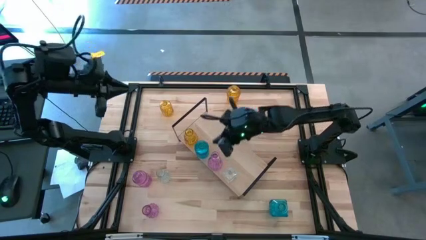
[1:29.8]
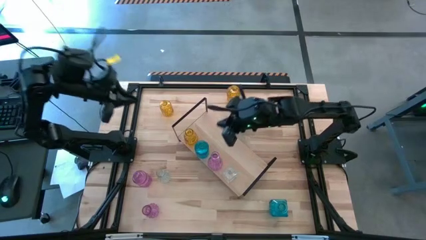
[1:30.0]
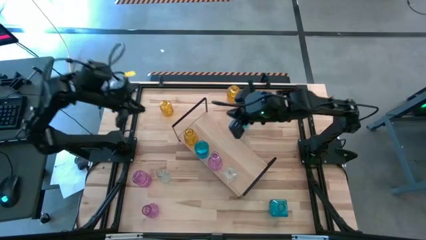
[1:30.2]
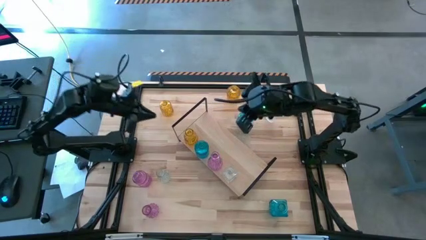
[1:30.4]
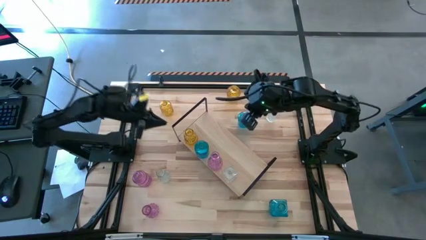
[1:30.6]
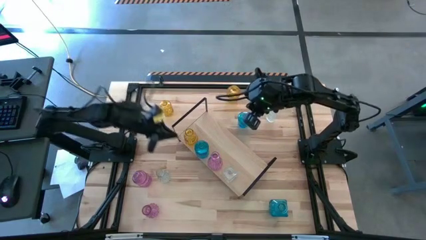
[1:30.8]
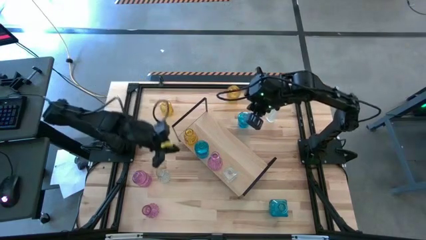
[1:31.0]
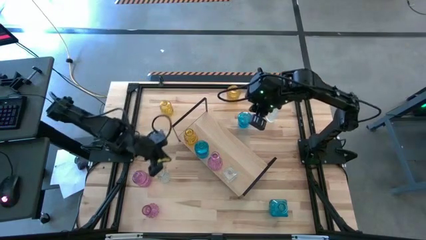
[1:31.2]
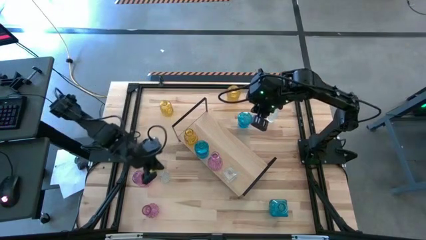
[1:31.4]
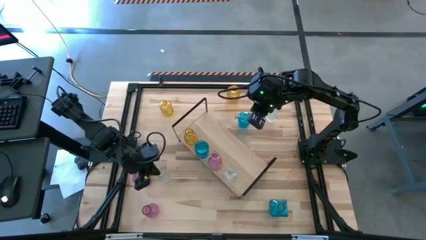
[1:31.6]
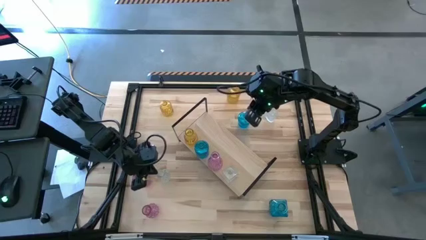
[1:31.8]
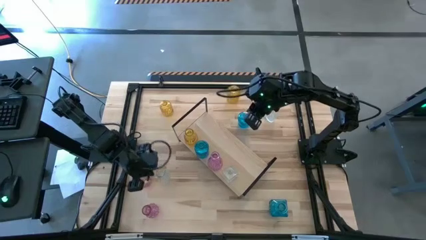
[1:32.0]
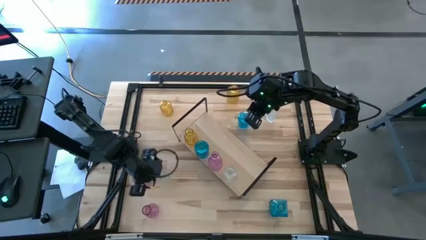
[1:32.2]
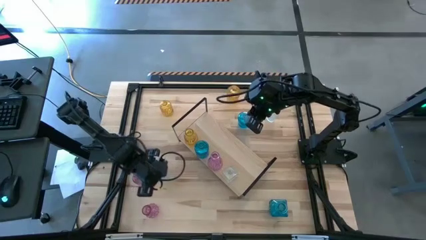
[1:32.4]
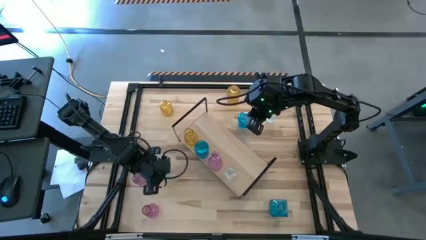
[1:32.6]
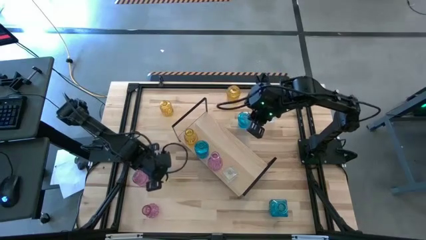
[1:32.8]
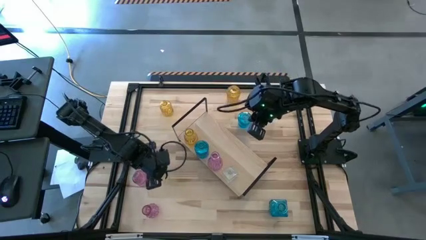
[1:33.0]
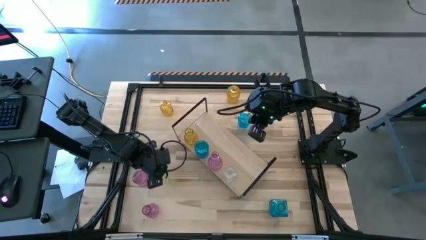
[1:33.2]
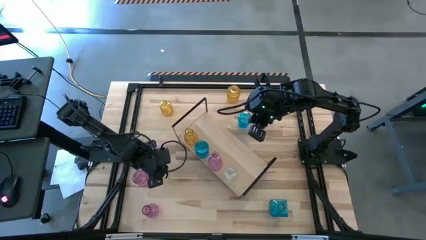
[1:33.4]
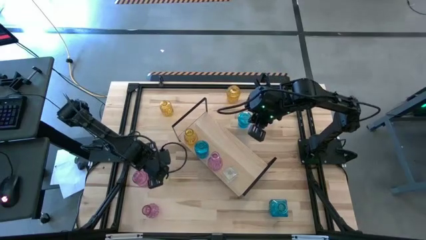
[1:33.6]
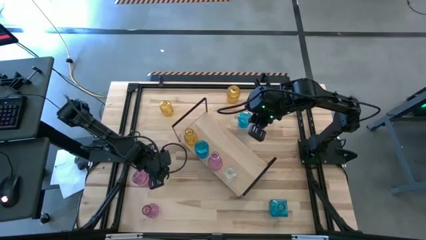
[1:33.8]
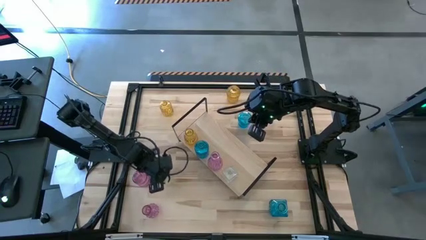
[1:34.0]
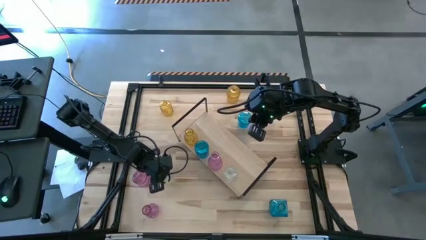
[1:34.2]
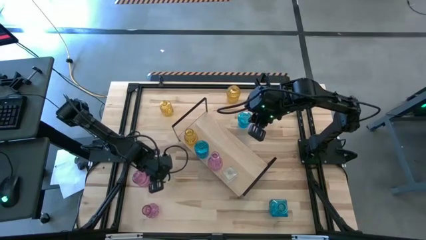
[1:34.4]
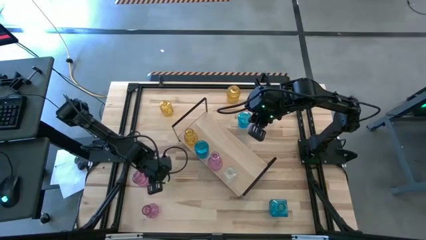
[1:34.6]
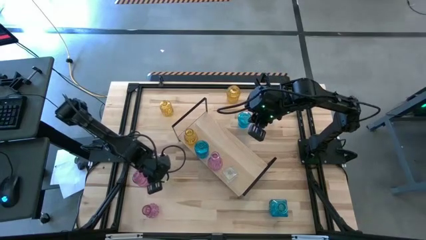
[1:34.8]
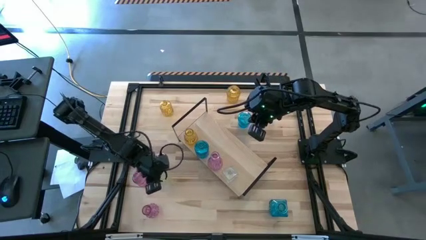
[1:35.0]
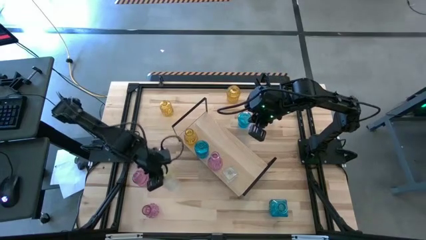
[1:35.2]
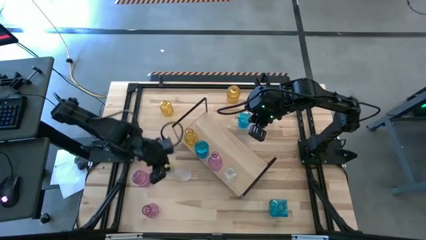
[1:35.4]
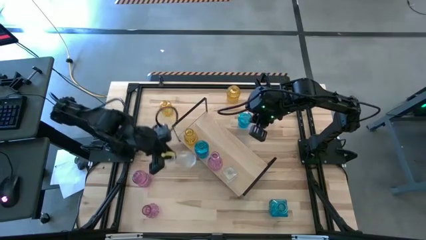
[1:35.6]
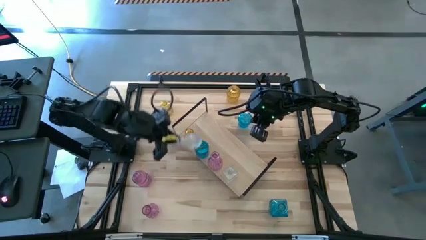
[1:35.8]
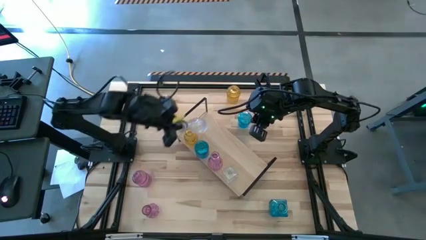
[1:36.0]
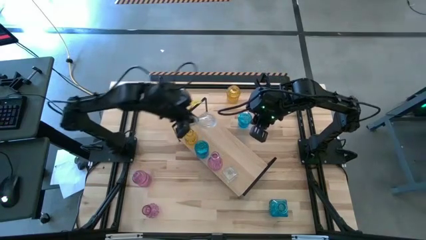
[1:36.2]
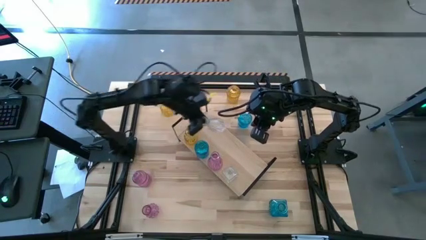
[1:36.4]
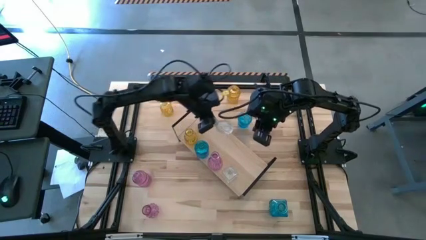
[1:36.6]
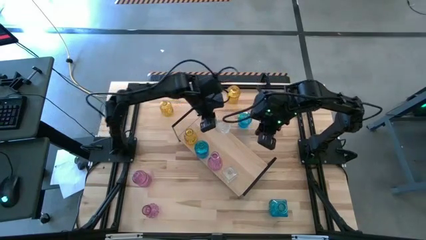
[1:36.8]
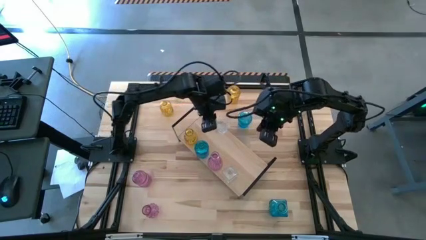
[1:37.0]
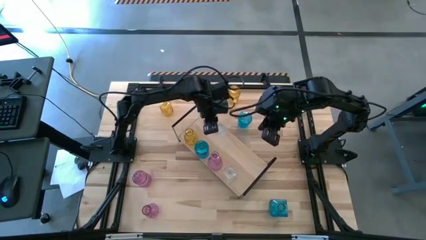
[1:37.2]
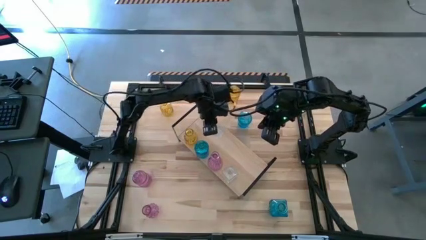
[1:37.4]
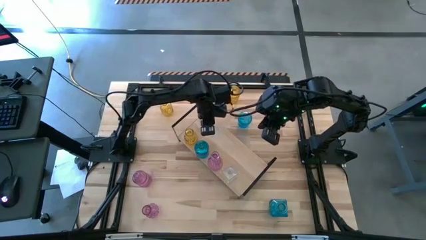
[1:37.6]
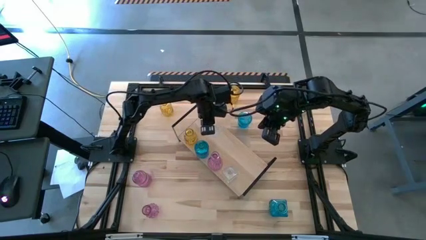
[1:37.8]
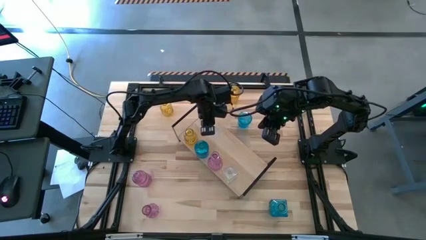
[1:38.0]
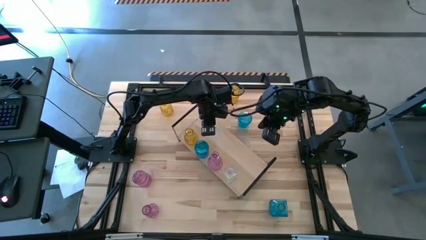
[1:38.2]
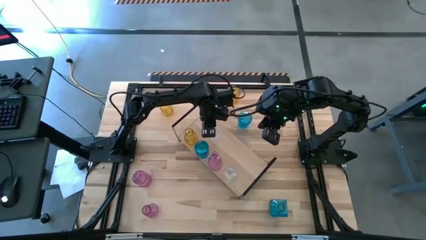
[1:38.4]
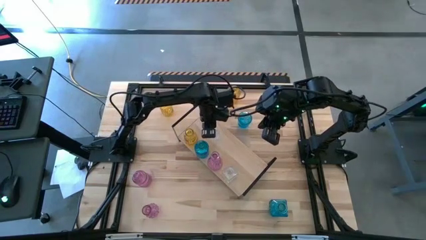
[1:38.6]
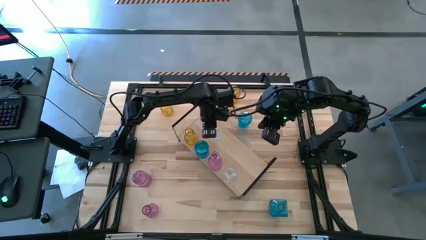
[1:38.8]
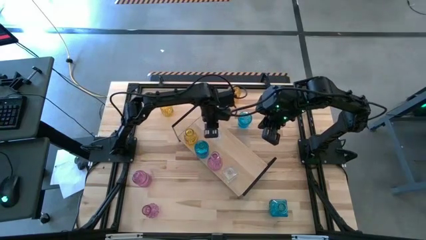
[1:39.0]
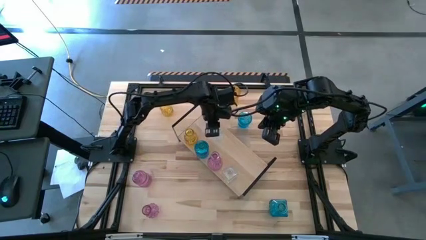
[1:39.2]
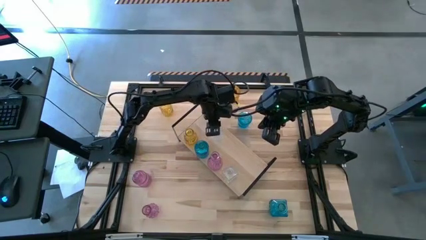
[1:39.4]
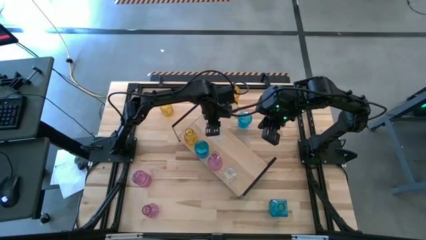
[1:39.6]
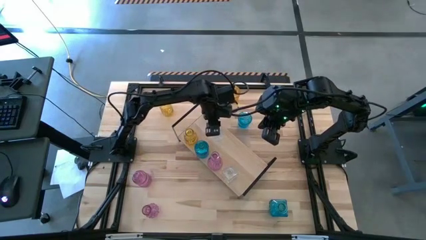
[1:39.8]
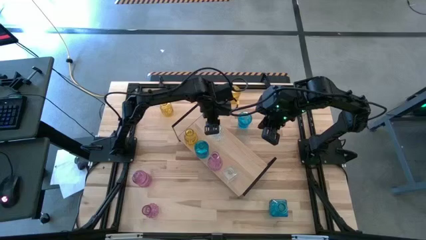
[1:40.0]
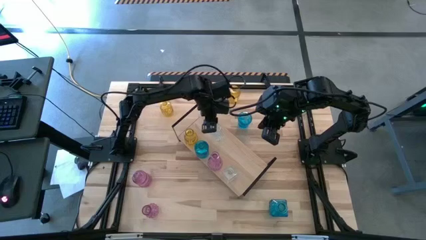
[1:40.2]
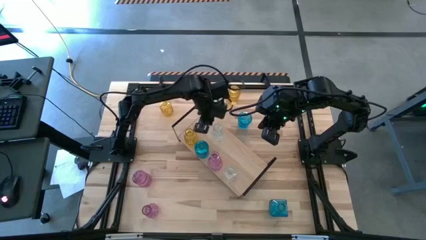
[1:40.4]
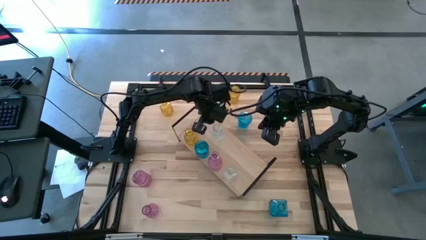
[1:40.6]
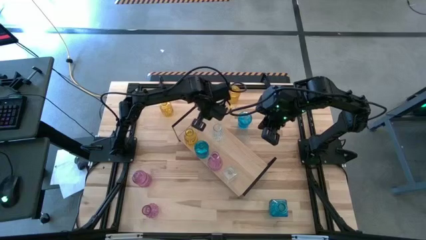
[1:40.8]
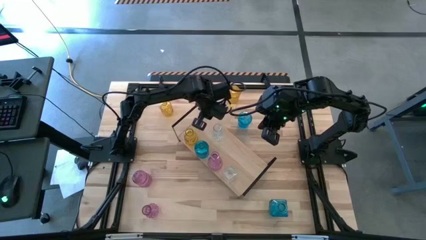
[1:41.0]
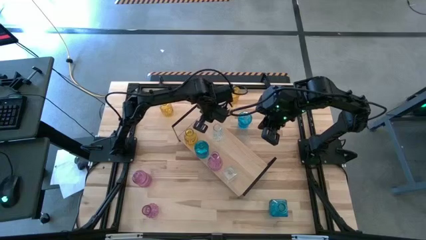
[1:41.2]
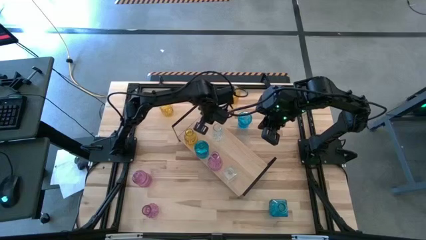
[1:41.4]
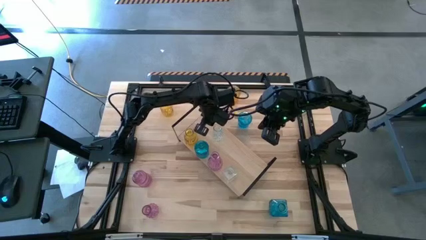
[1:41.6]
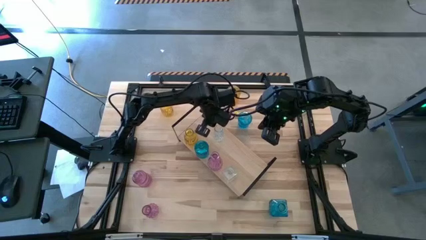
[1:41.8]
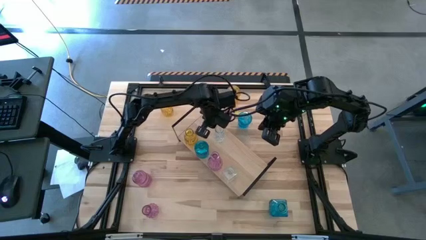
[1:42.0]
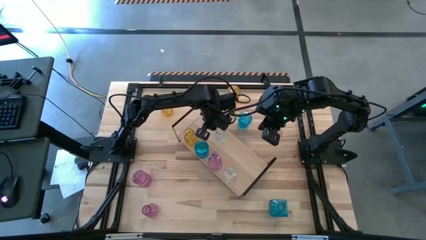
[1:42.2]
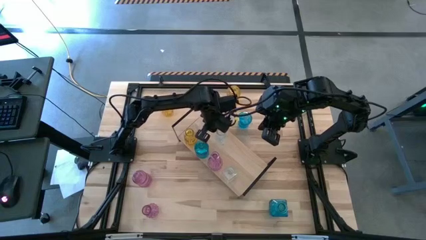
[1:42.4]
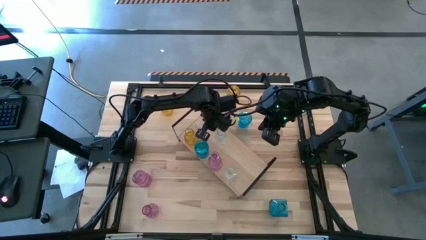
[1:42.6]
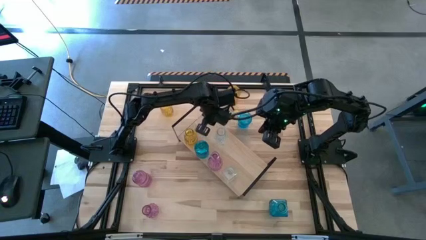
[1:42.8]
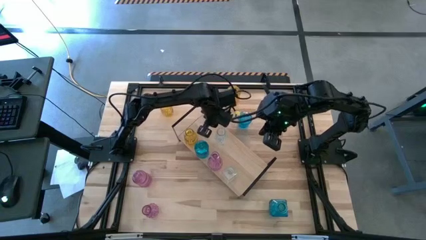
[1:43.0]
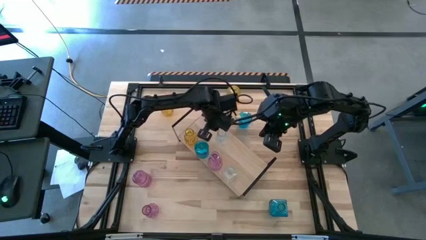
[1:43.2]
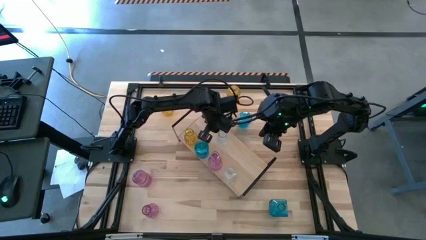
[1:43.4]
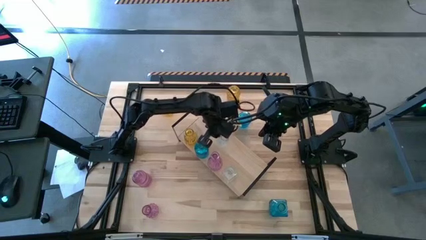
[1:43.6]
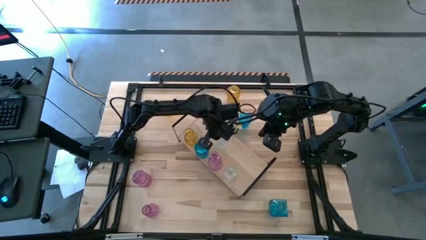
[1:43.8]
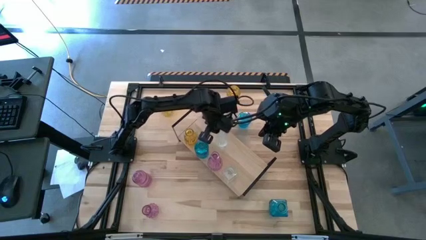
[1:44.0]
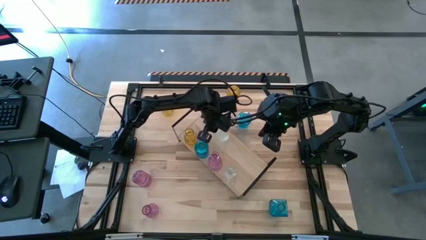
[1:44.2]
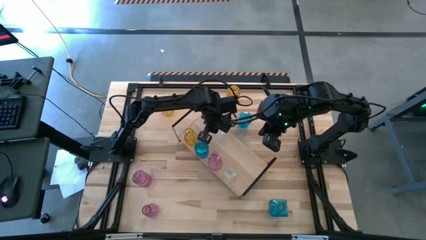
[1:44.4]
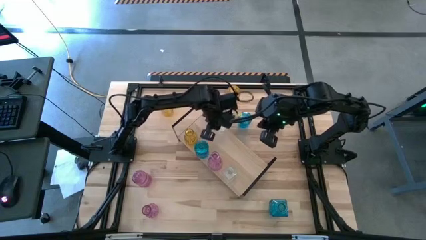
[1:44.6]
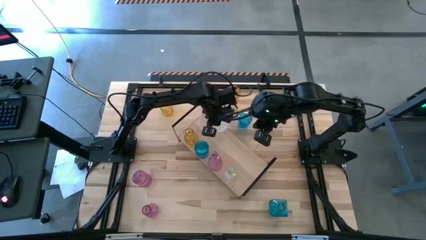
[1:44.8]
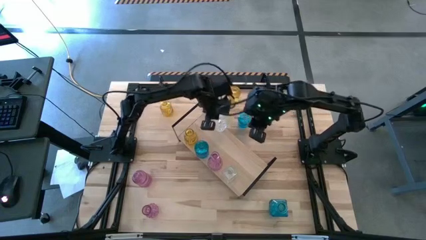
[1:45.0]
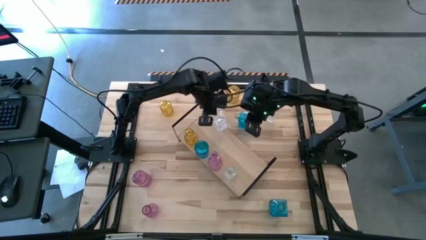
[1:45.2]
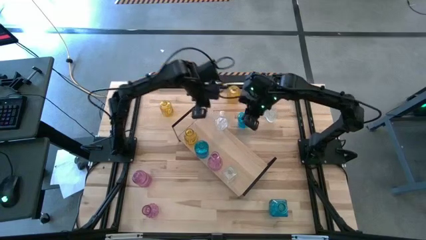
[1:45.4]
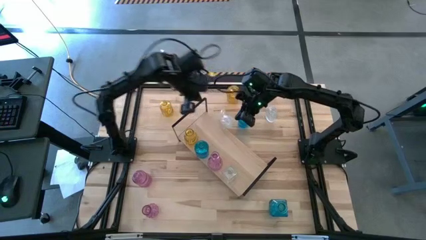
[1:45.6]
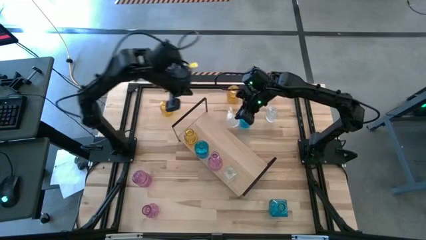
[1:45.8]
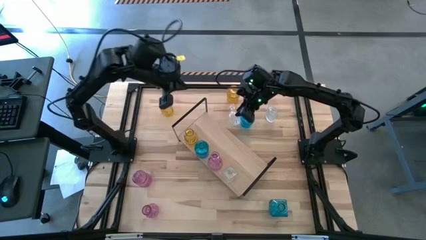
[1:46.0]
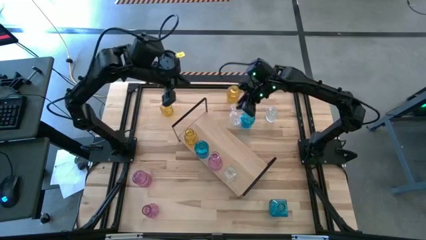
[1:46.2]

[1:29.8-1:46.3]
Task: sort vases onto shelf
Put the bottom crystal vase on the shelf
